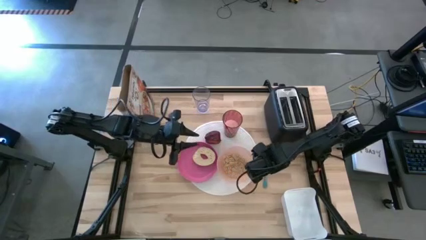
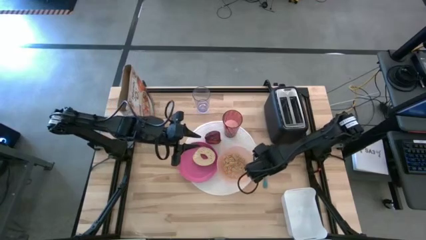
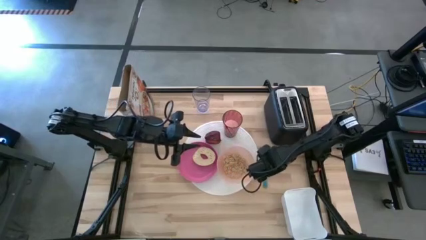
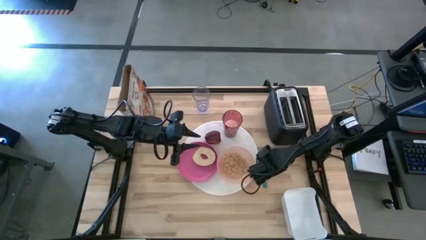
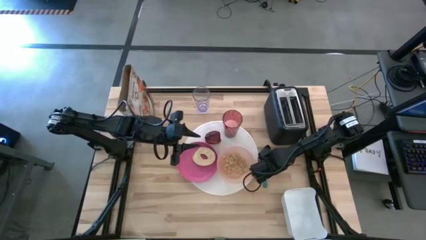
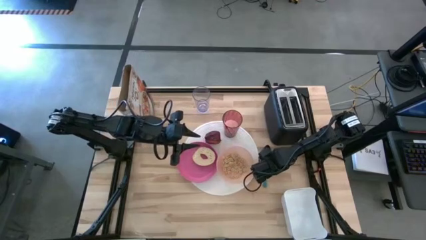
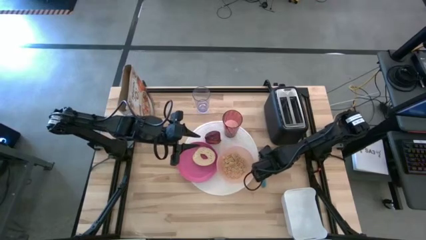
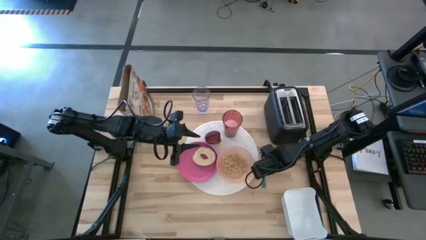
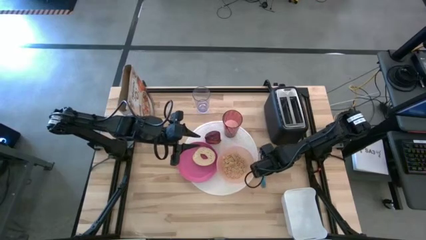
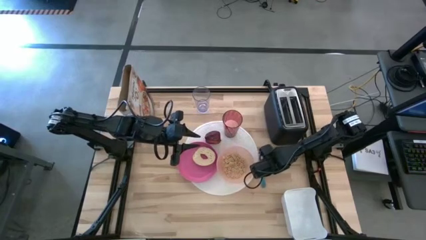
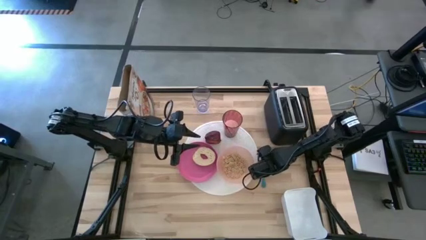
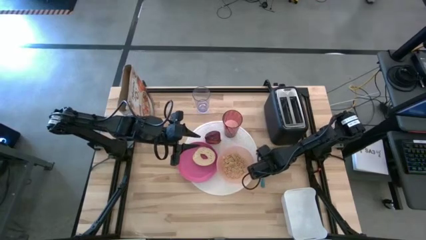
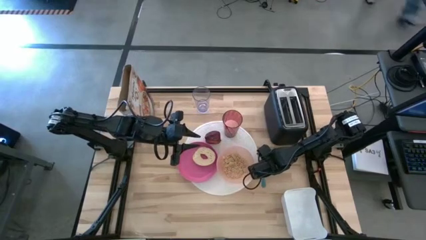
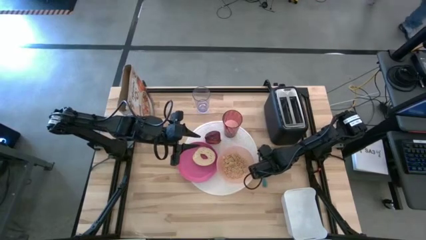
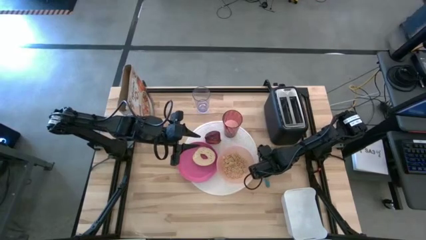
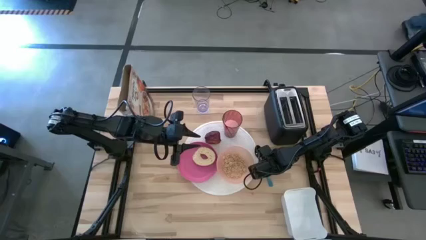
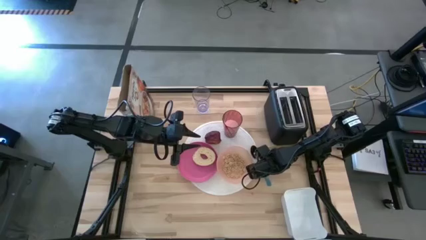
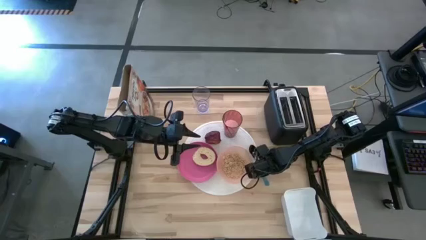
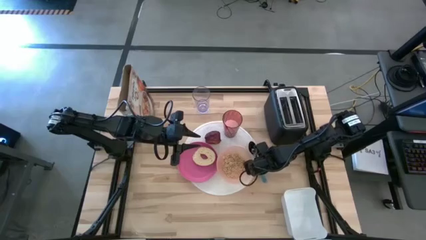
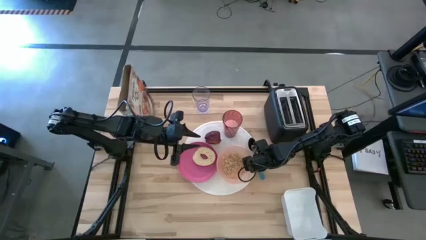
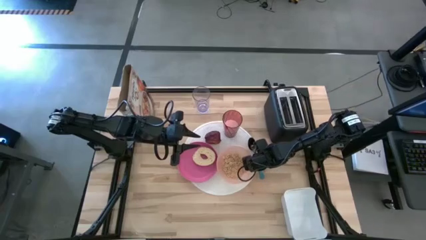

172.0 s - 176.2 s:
Task: Arrange a breakfast setting
Adjust the blue spoon

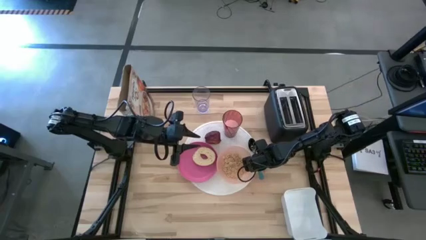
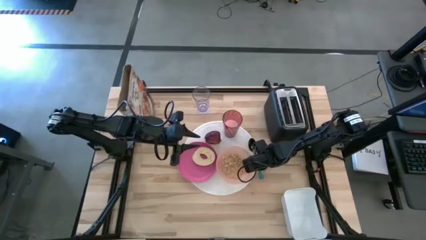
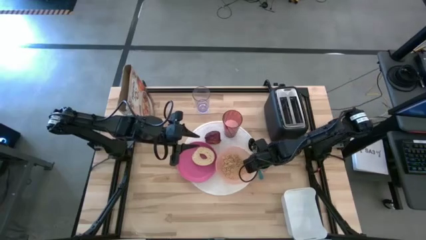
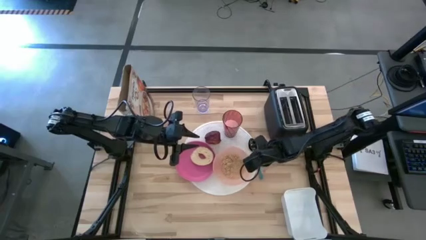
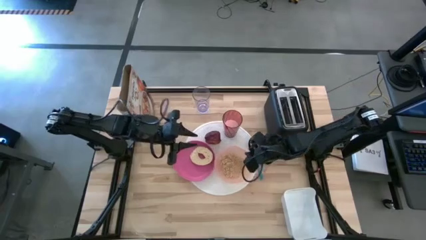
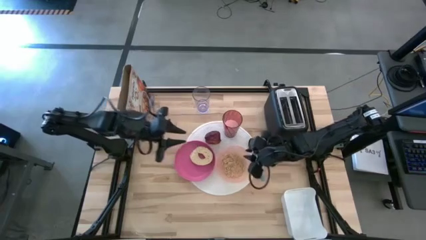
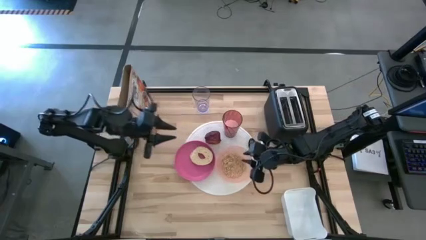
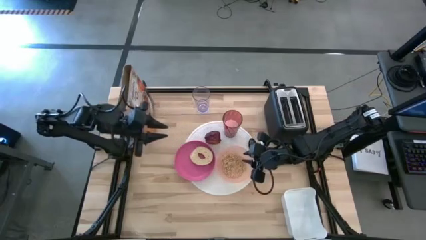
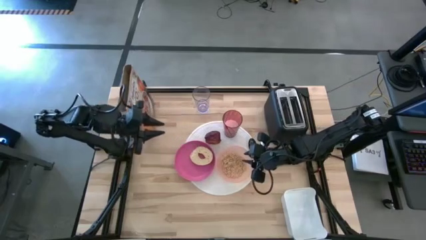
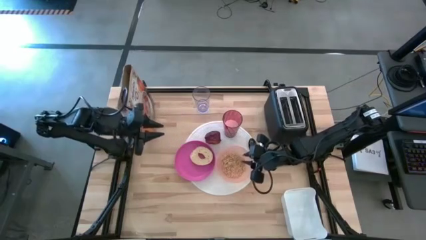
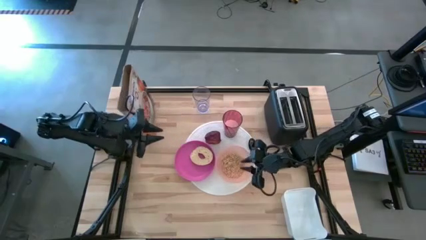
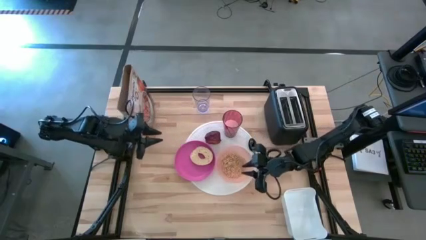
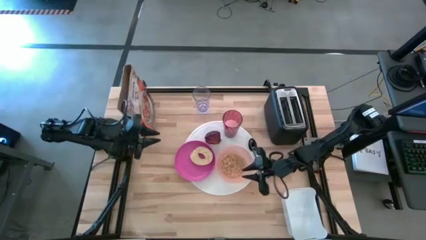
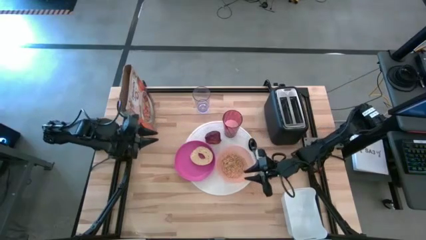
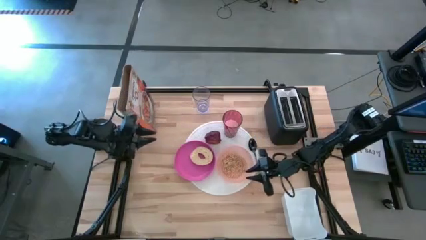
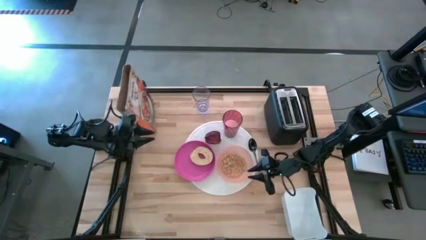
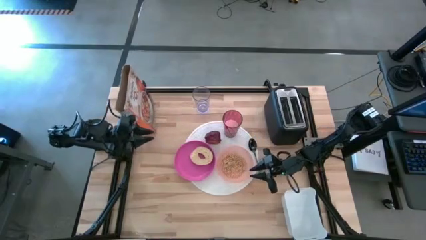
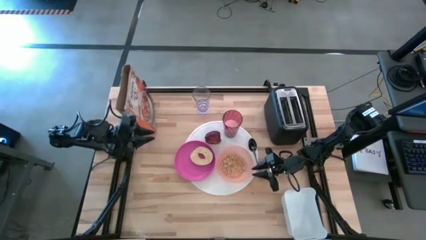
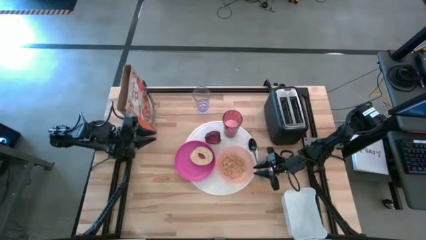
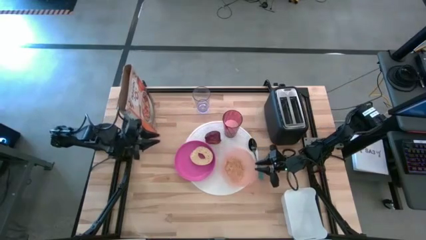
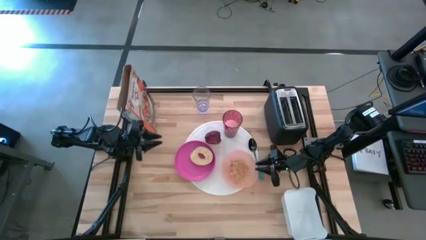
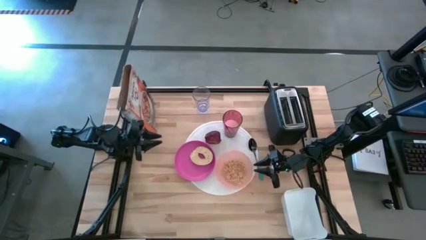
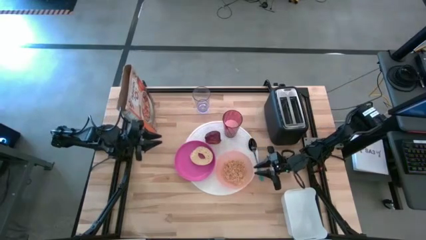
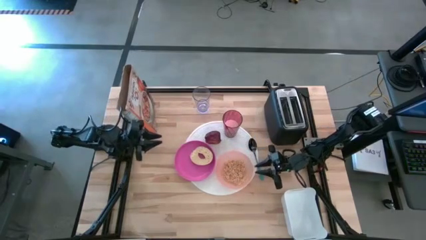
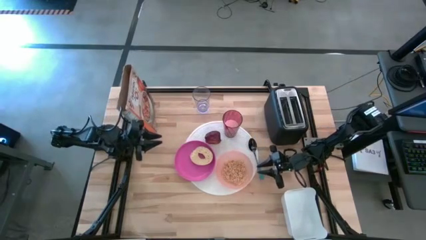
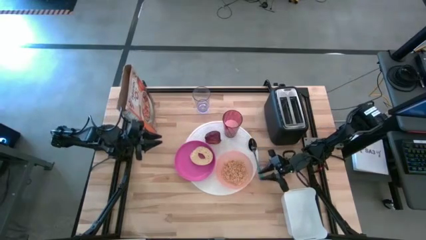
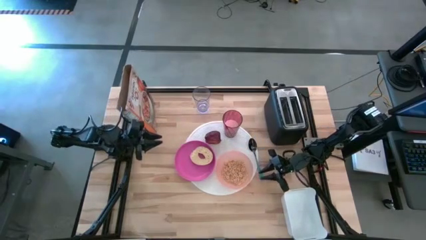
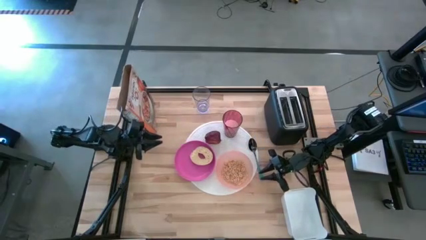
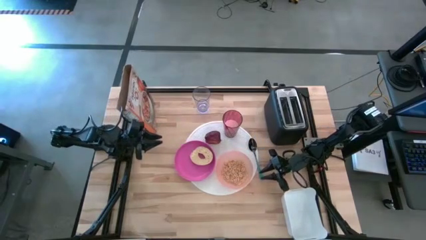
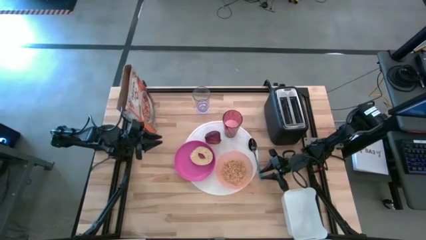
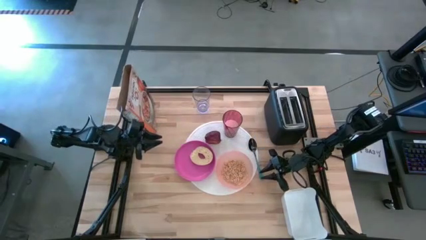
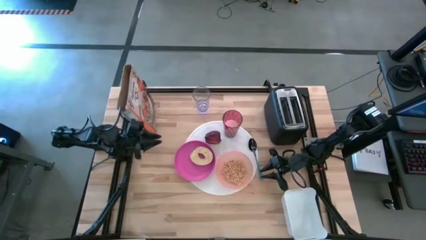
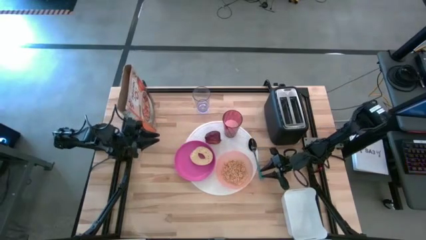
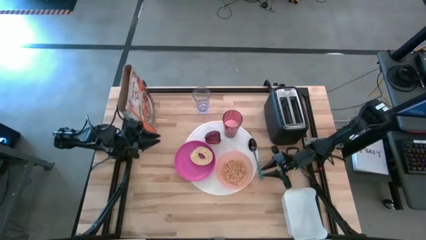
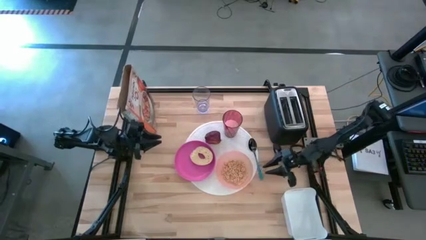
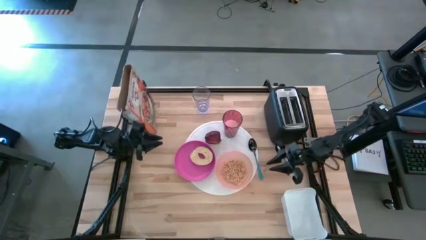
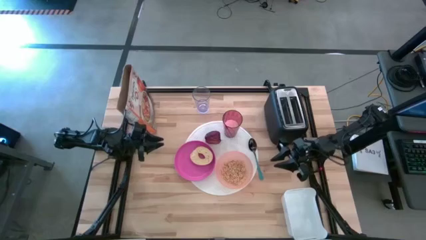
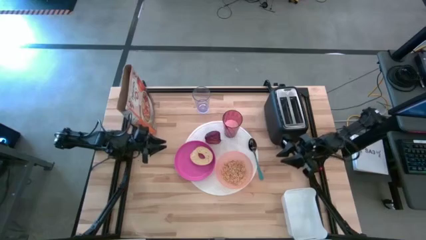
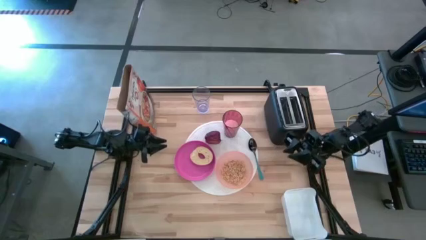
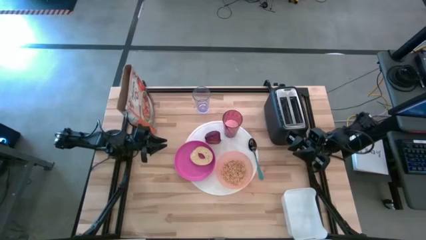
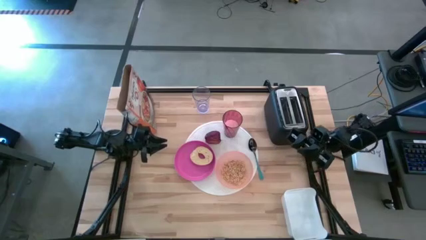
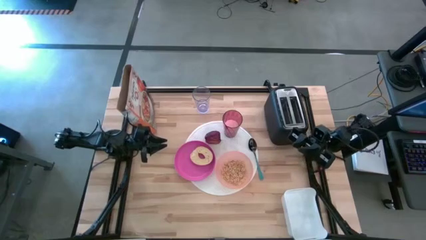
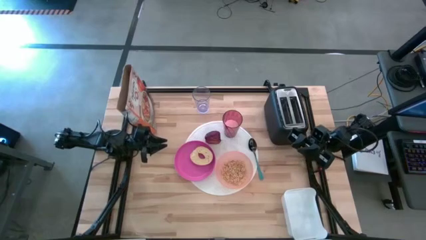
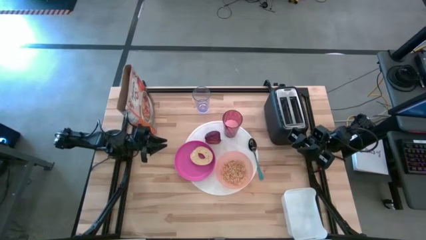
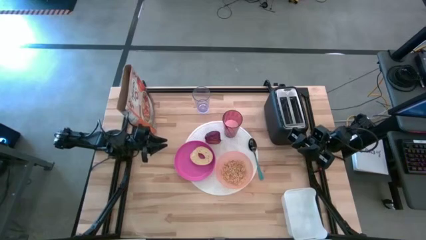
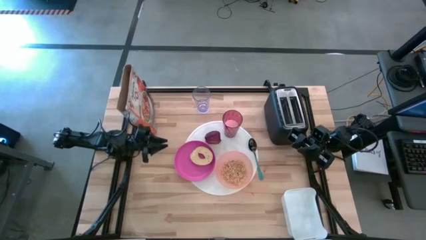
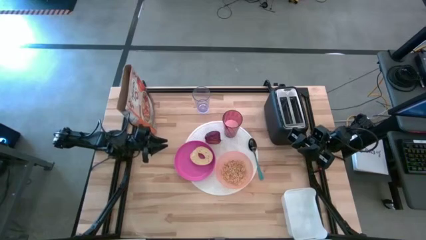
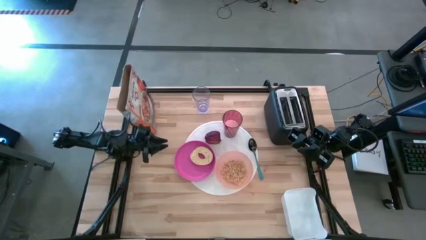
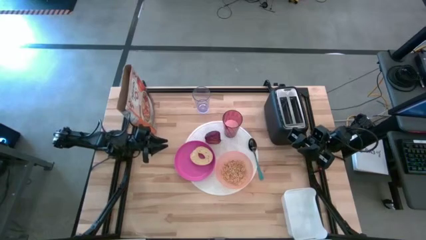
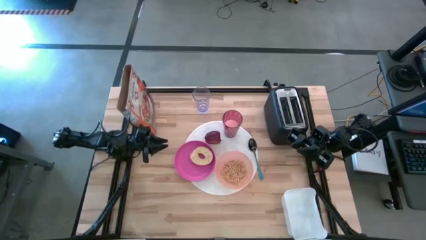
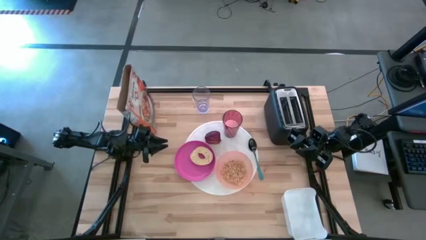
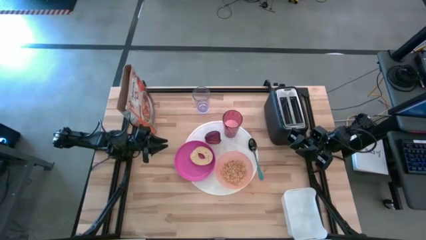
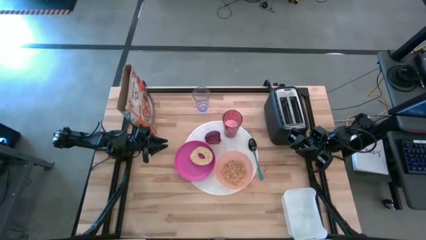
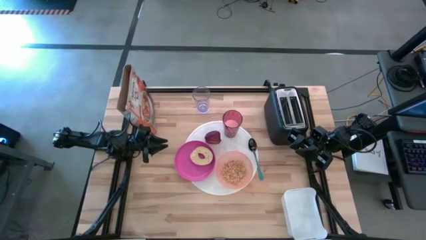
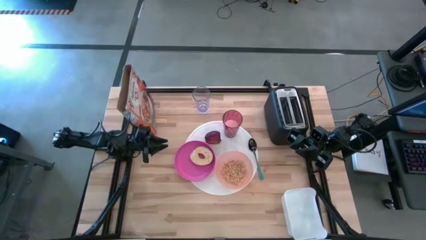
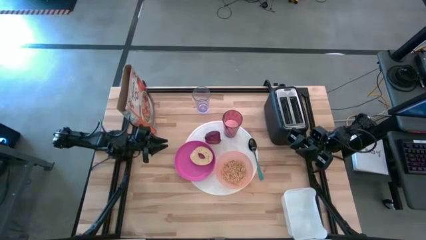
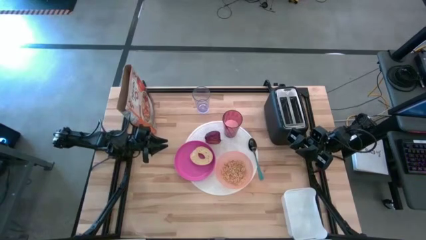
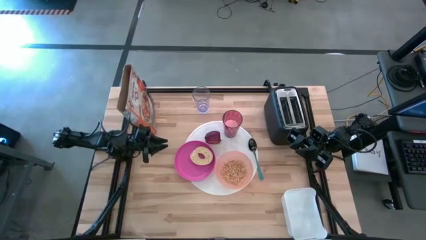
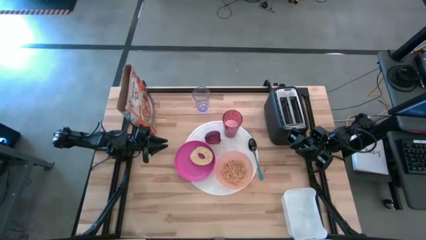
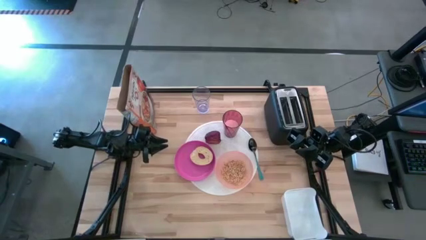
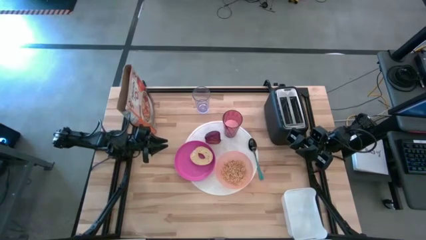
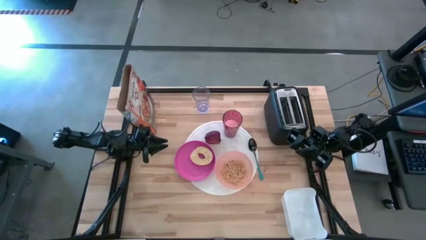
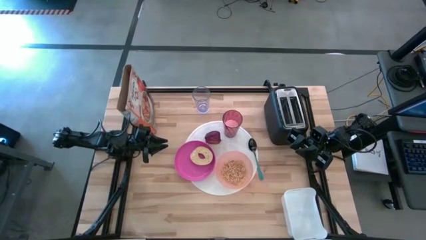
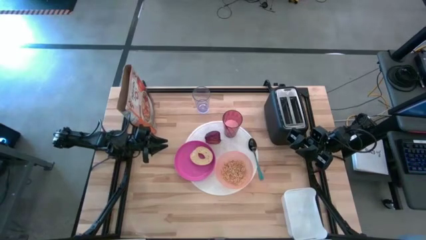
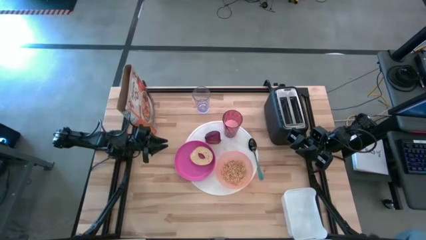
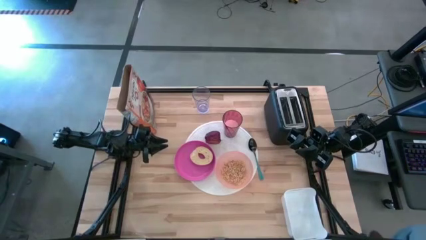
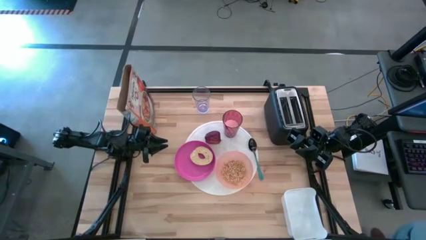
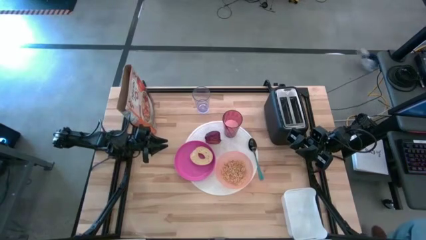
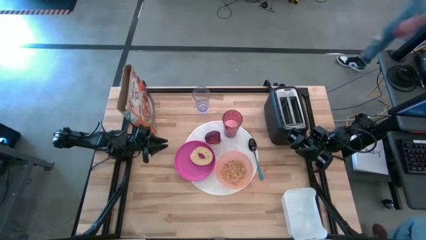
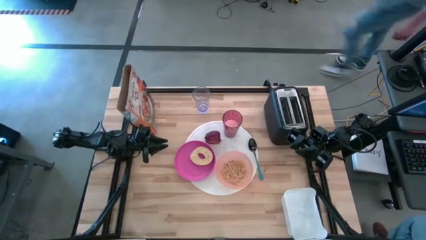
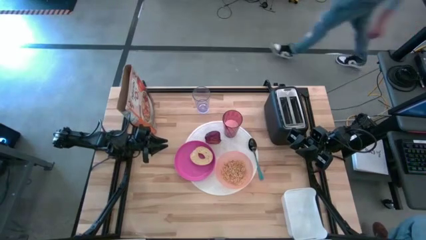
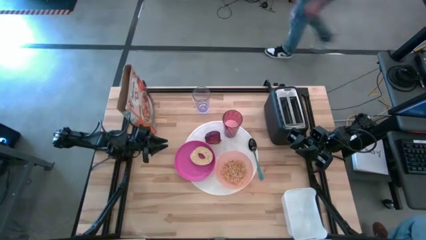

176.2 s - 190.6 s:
Return to Home Position
